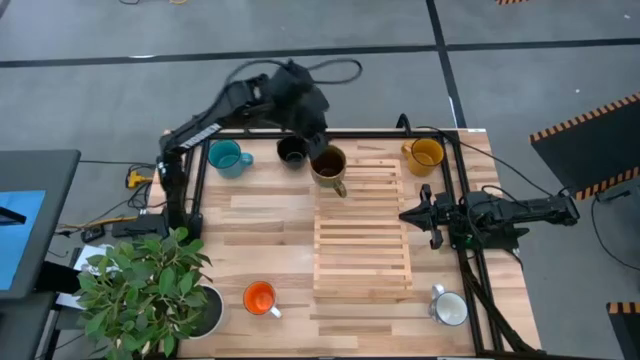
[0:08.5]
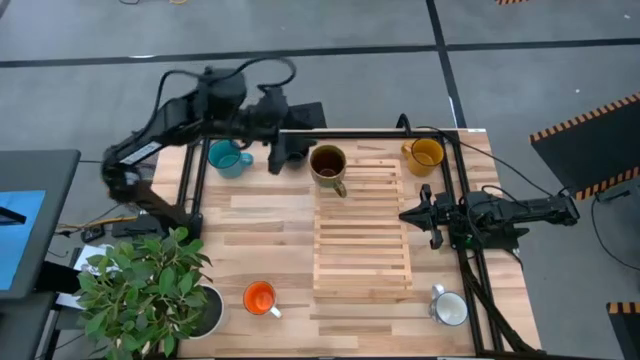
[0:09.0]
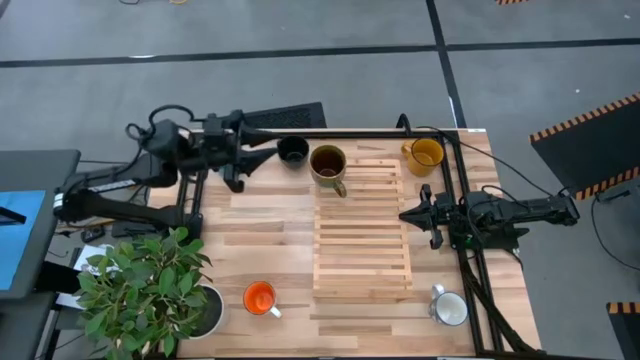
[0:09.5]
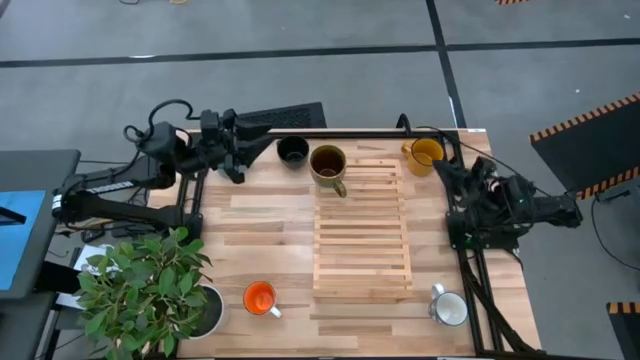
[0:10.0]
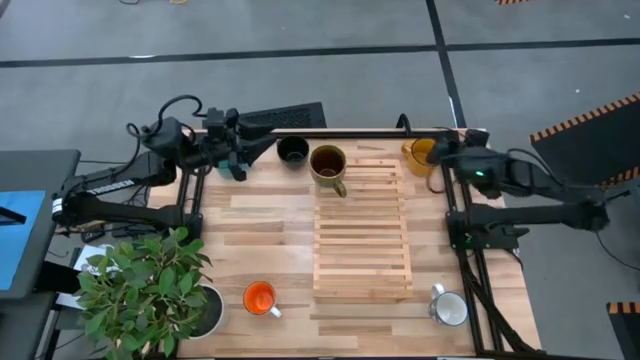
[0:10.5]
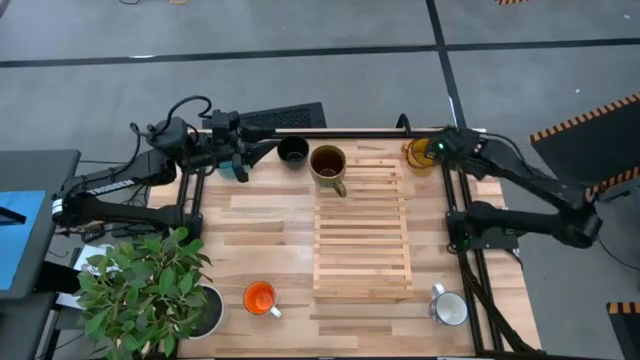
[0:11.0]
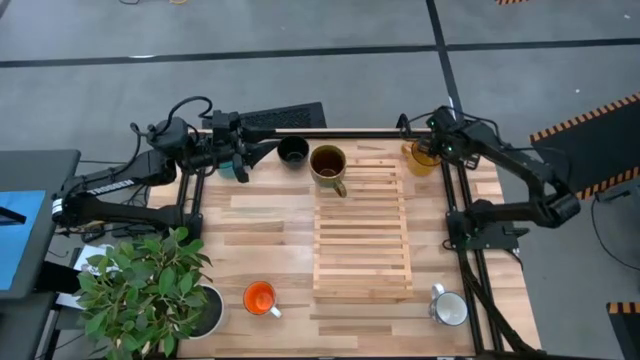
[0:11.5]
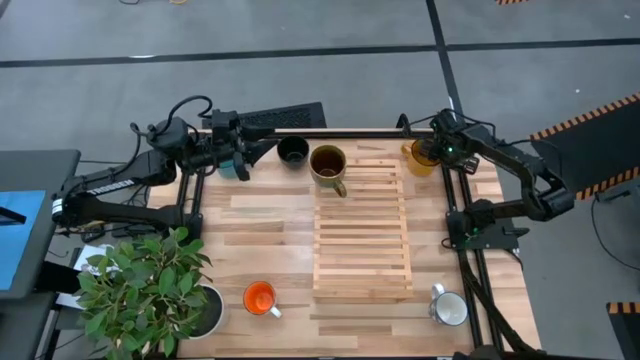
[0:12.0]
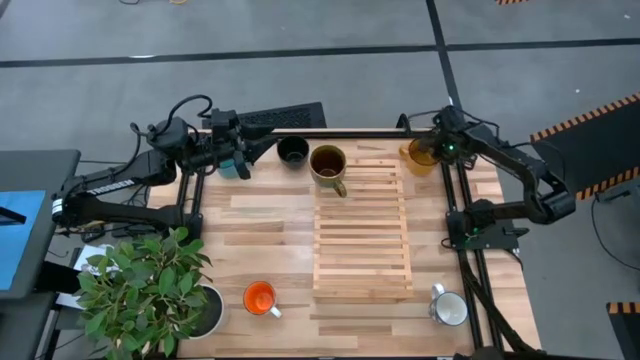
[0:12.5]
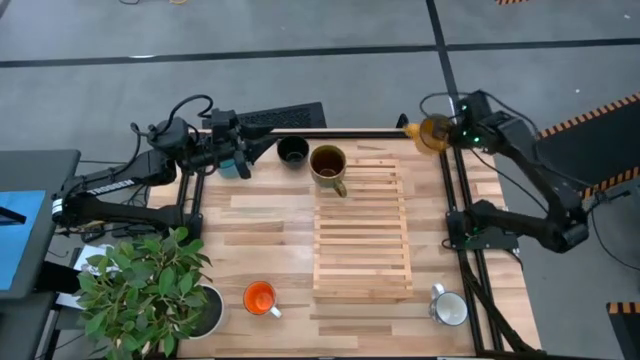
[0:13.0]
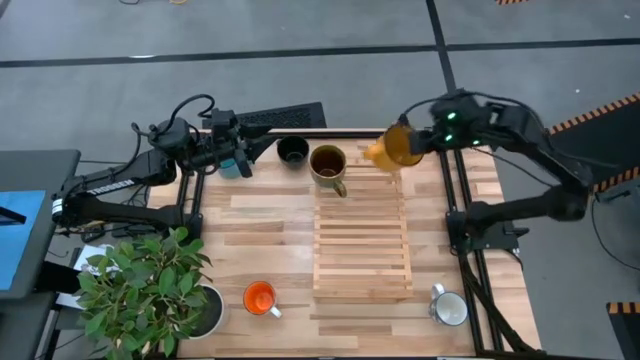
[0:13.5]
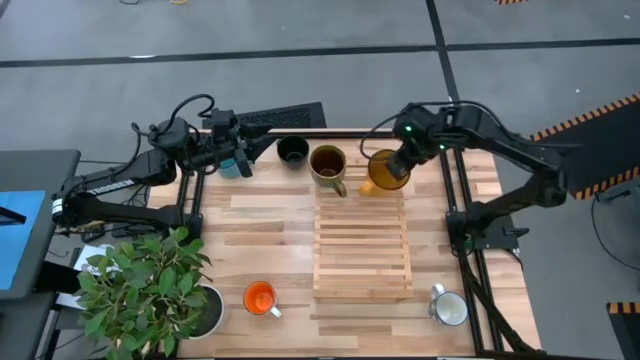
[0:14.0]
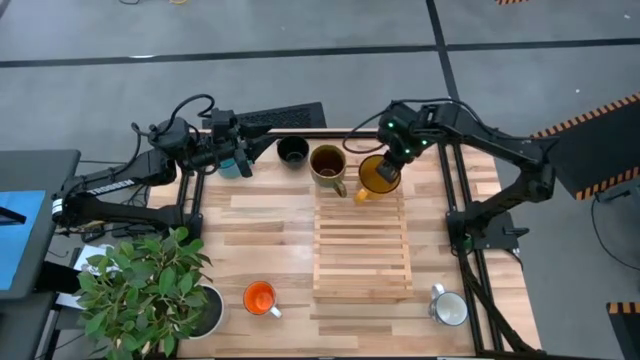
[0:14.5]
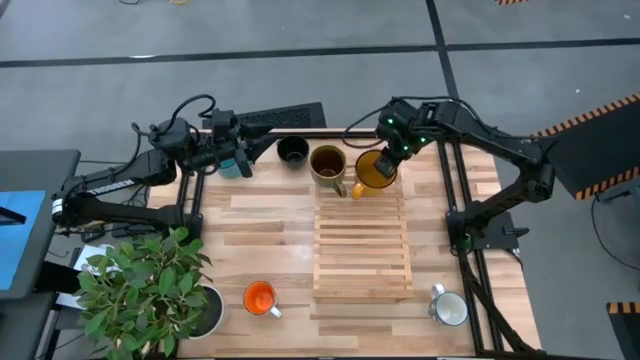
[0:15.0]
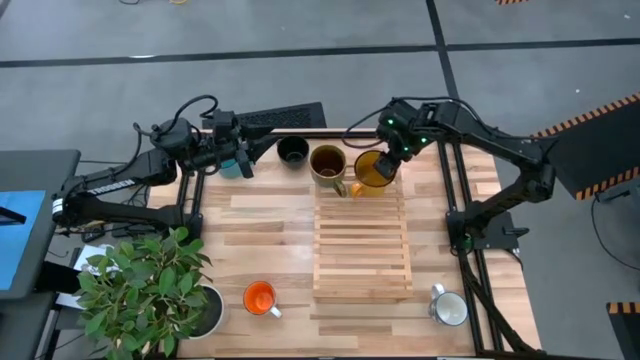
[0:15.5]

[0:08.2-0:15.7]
Task: Place coffee mugs
Put the yellow mug on the shelf

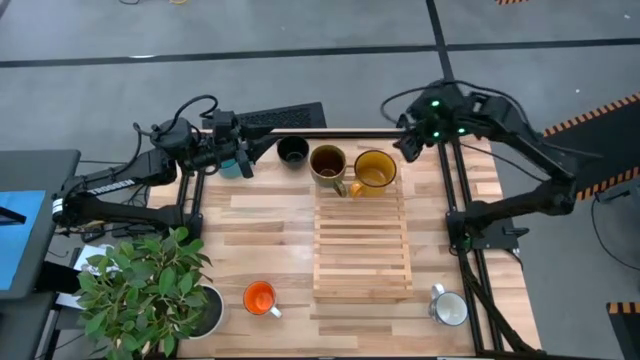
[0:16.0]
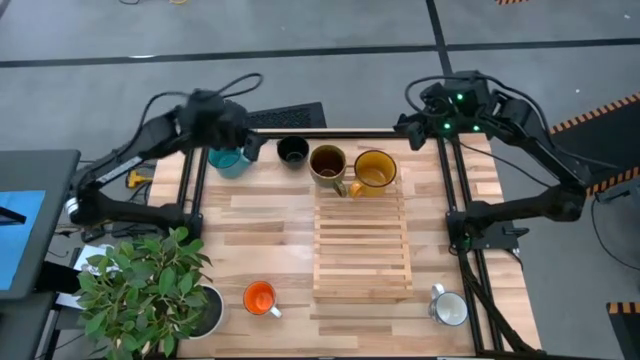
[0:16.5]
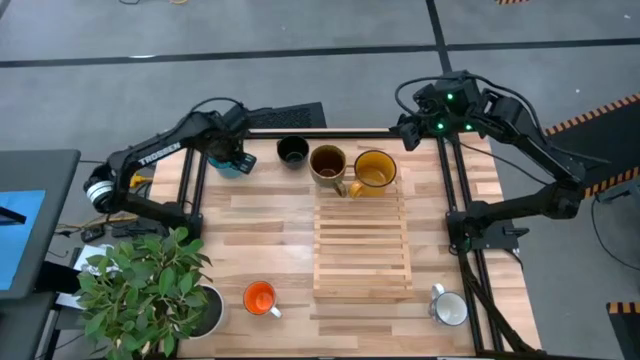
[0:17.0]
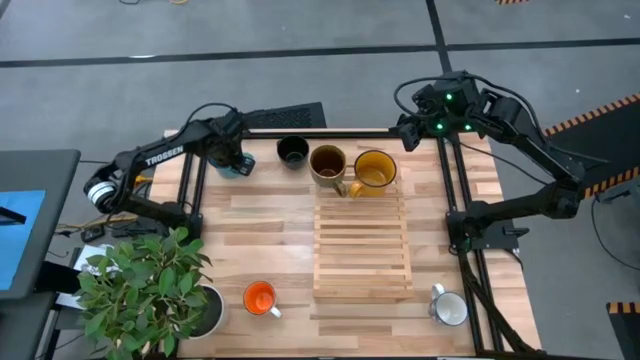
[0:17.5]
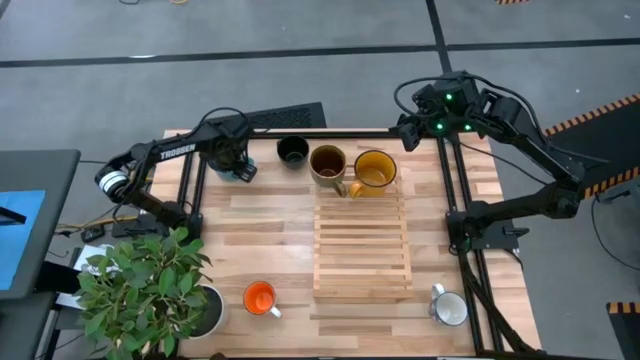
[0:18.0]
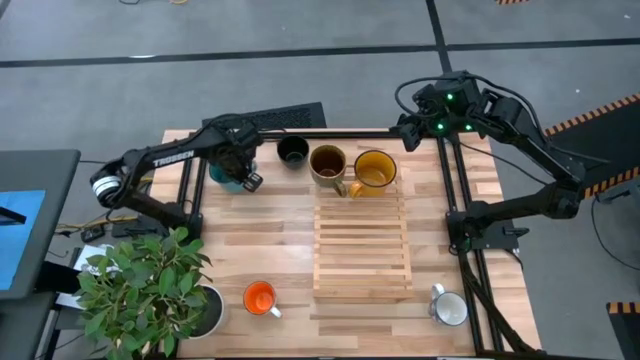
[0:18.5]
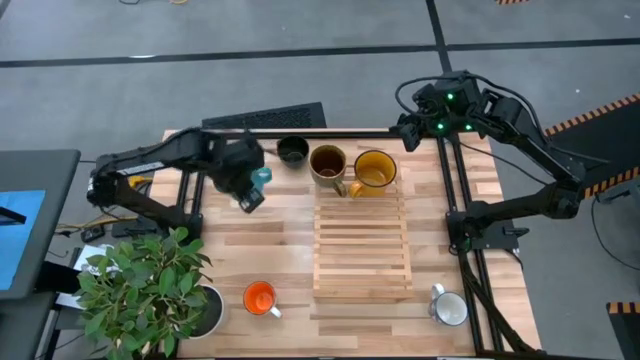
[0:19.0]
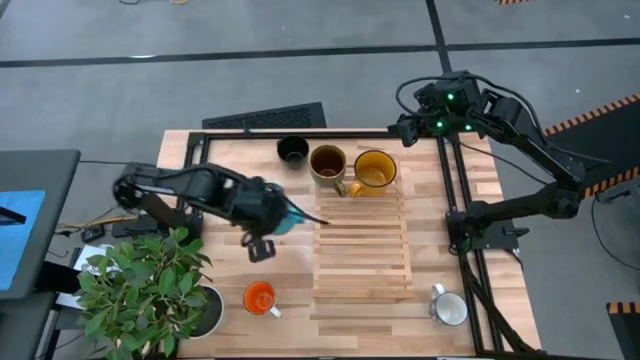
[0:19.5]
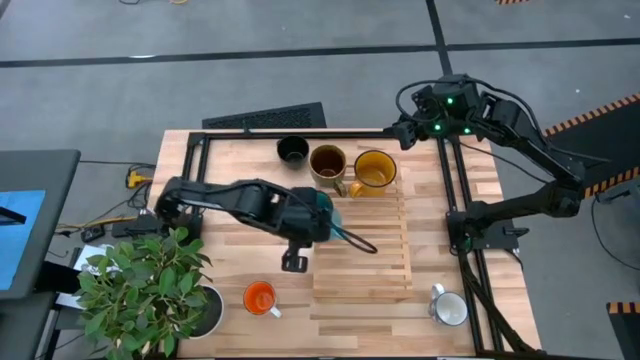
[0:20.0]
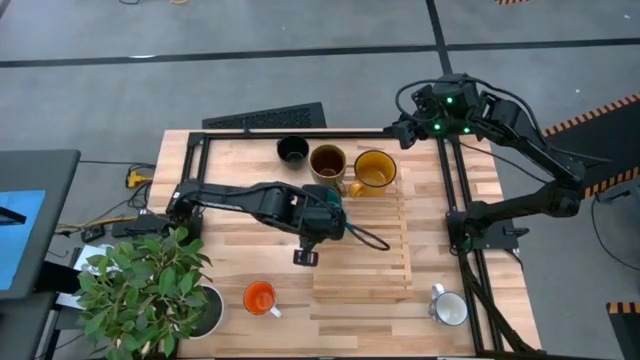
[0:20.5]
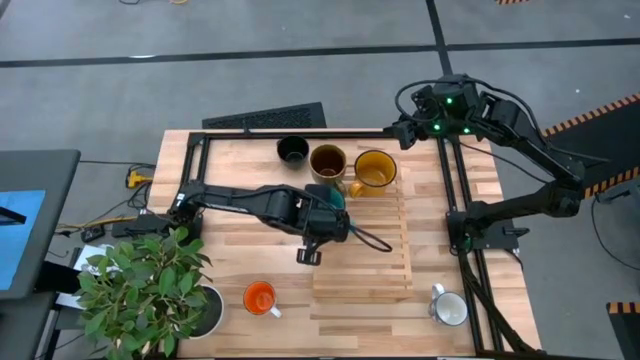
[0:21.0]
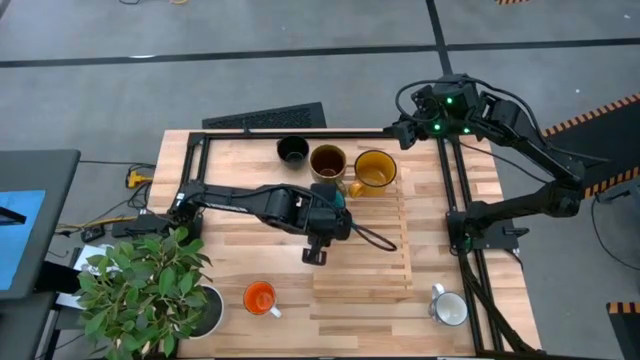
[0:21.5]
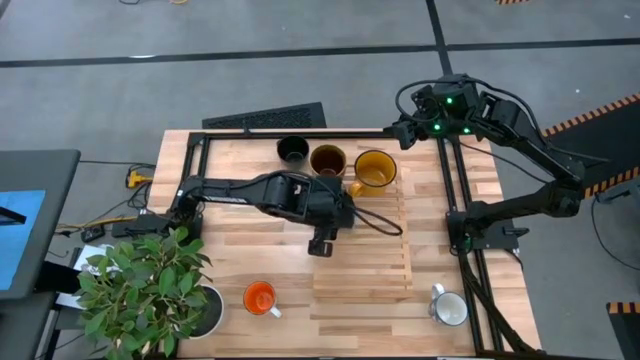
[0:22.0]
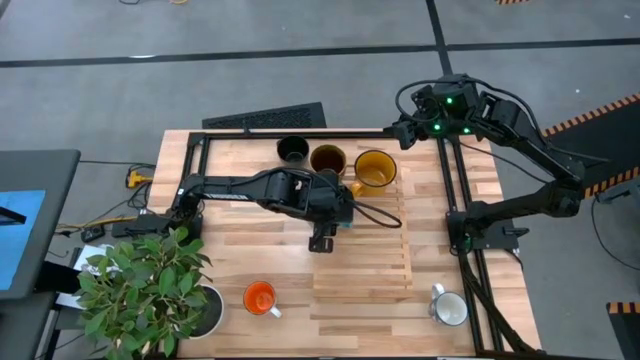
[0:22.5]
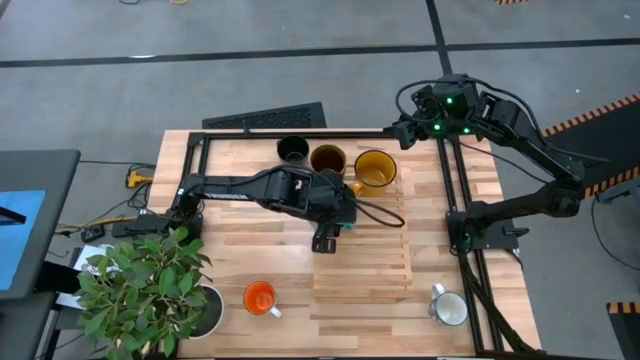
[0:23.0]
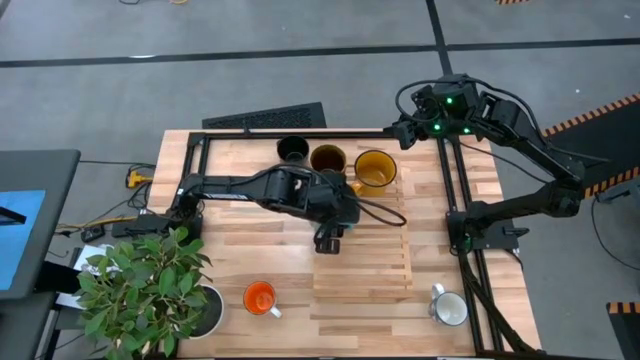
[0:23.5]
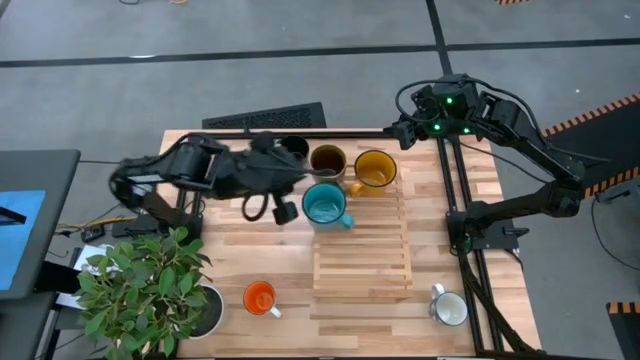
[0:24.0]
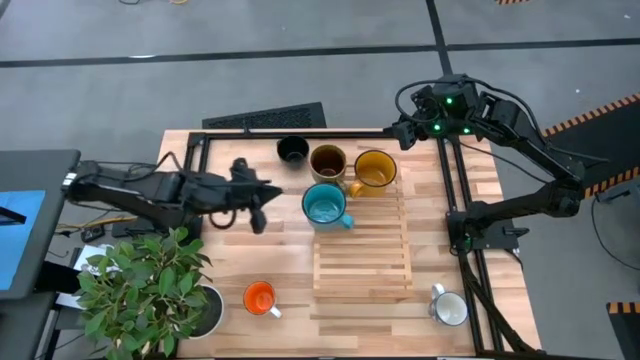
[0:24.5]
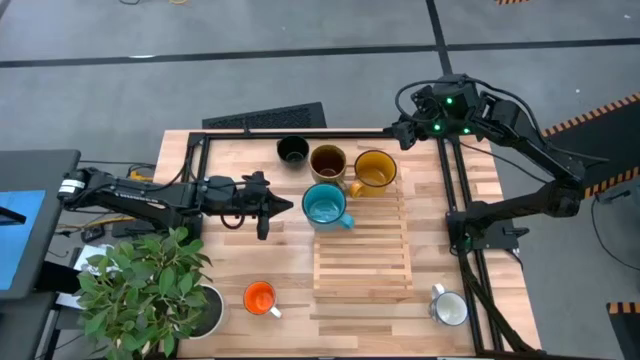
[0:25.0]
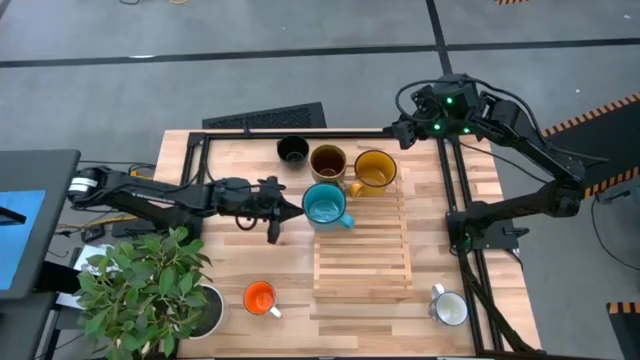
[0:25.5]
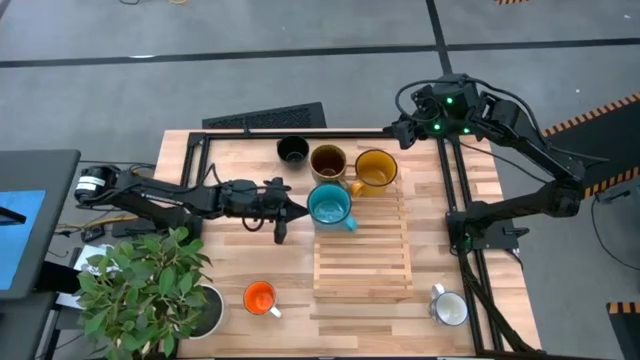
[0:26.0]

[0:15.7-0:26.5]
Put the blue mug on the shelf

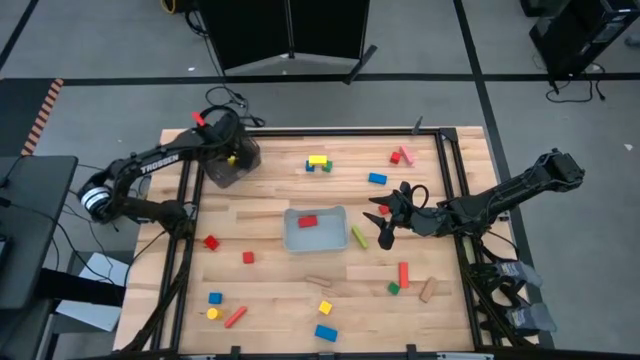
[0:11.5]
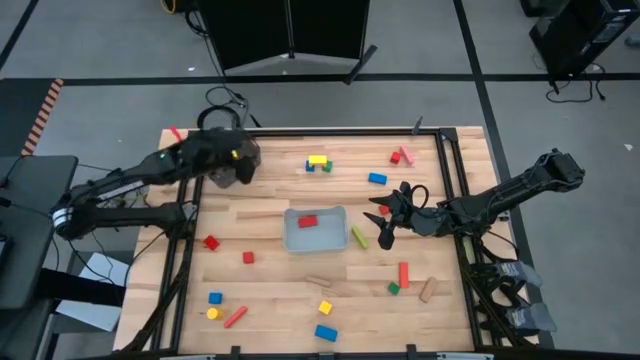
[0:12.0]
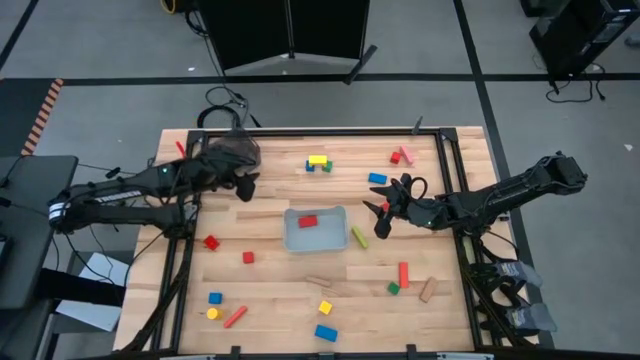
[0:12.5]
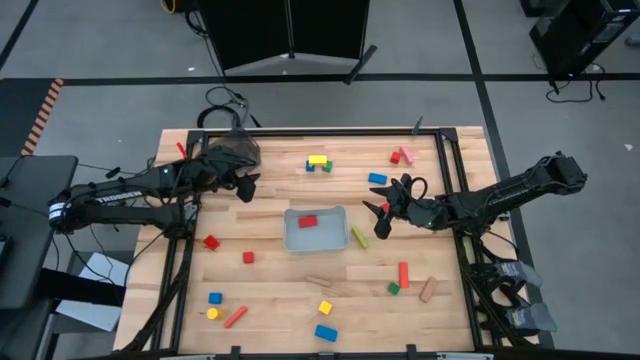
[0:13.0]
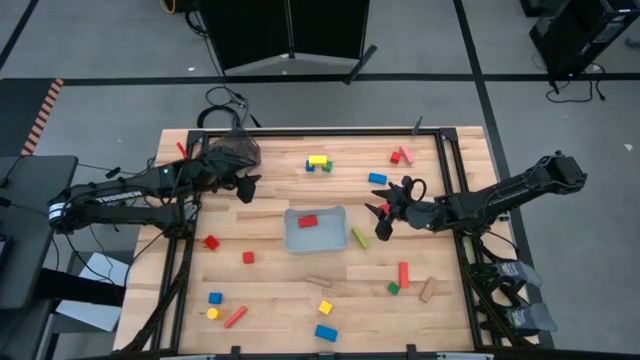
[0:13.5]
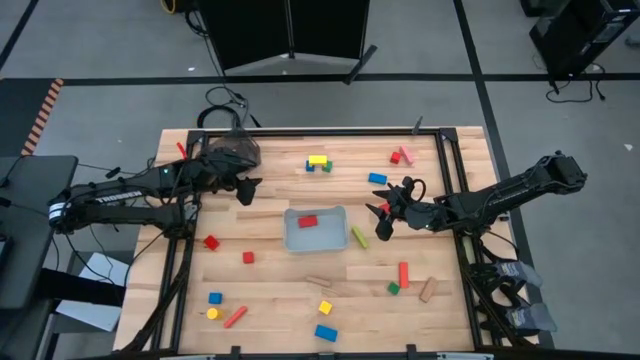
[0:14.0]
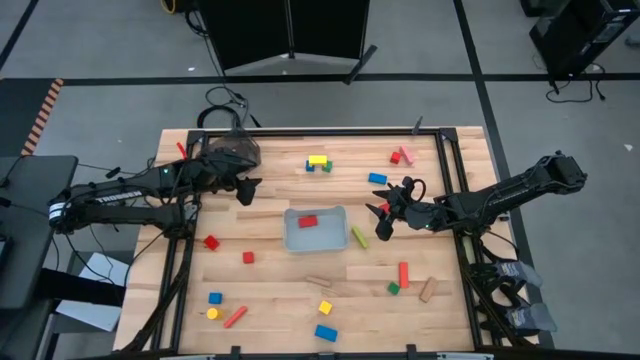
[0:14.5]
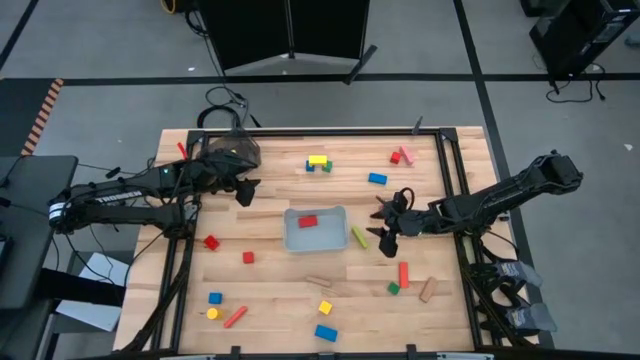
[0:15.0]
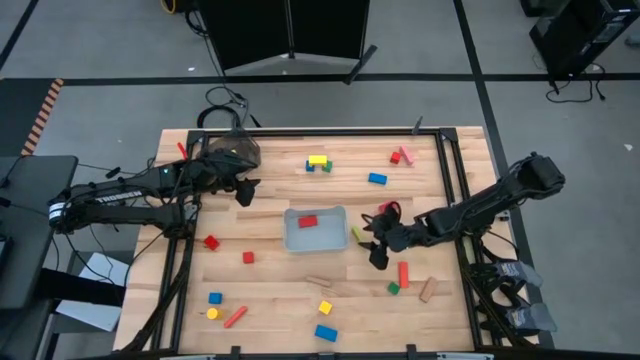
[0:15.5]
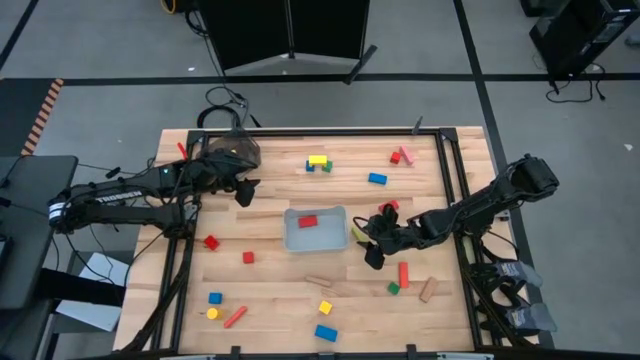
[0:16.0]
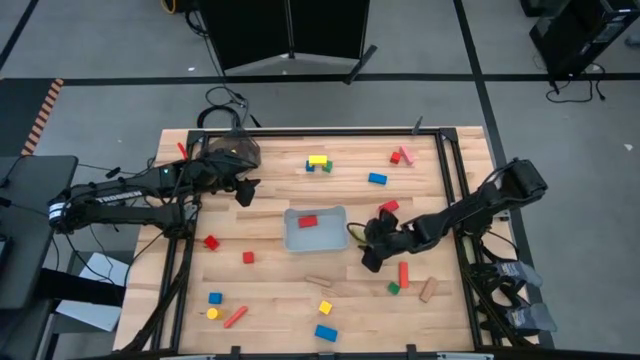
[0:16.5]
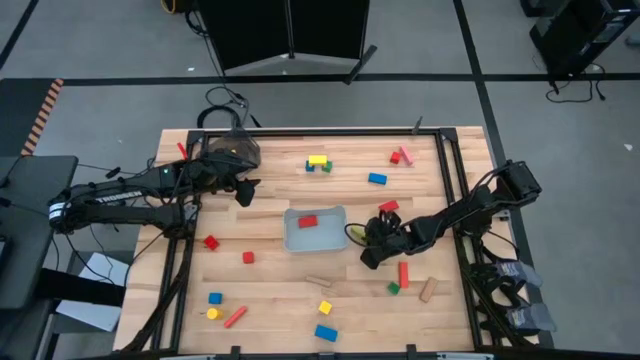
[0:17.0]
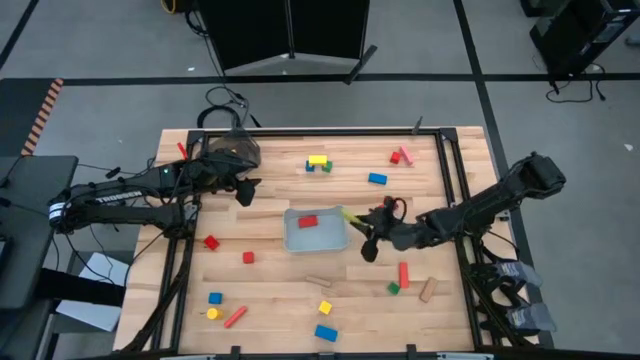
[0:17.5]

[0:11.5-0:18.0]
Task: Sort blocks by size
Put the green rectangular block into the gray bin
